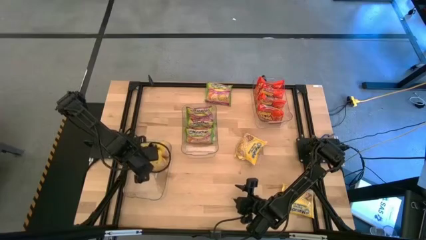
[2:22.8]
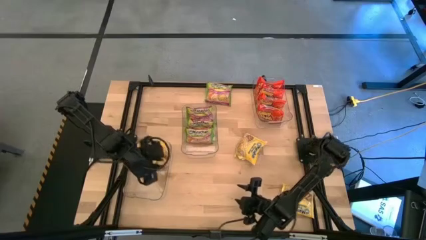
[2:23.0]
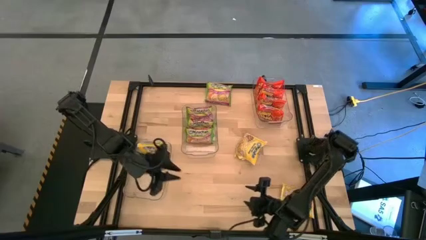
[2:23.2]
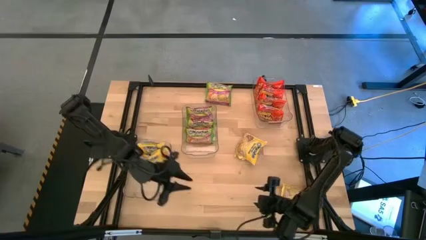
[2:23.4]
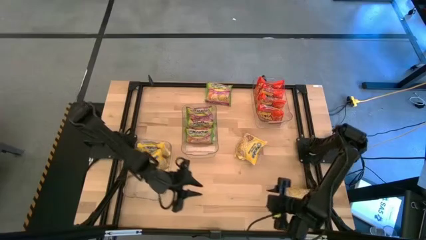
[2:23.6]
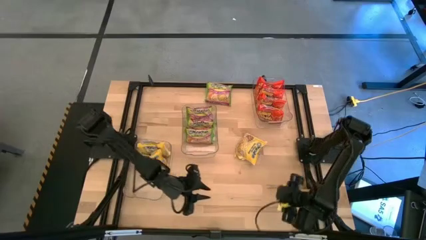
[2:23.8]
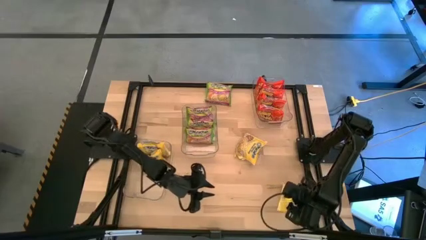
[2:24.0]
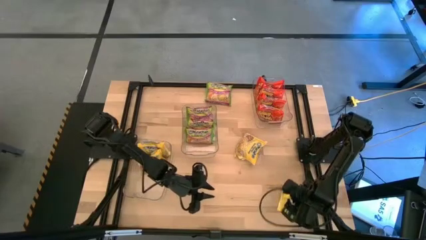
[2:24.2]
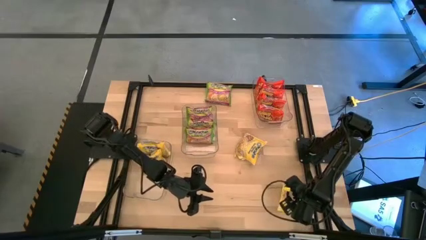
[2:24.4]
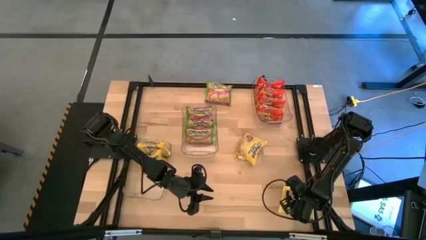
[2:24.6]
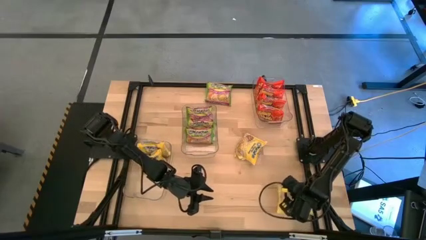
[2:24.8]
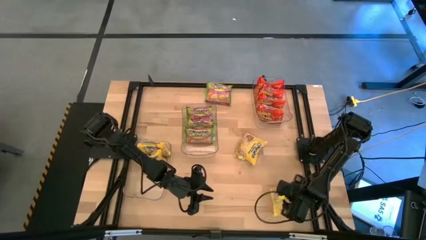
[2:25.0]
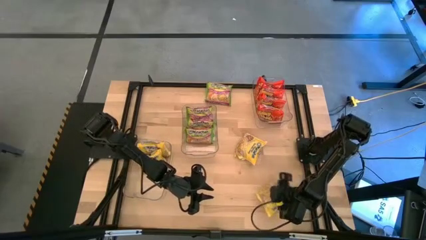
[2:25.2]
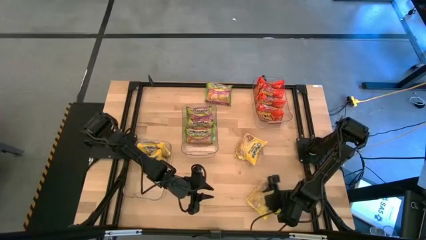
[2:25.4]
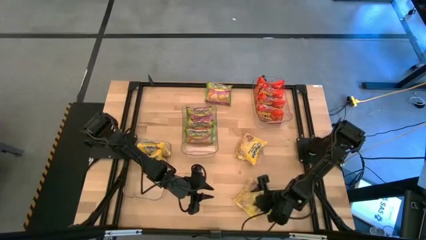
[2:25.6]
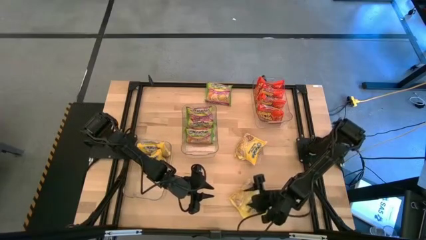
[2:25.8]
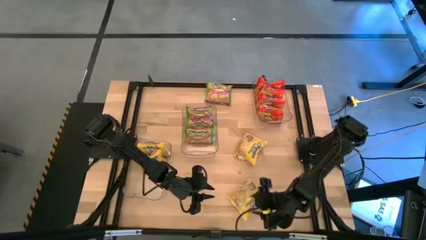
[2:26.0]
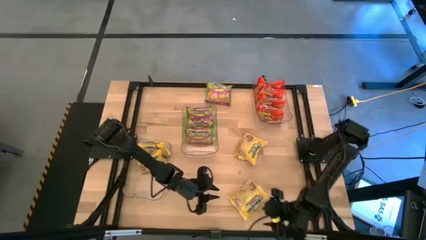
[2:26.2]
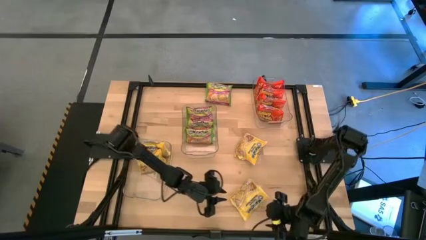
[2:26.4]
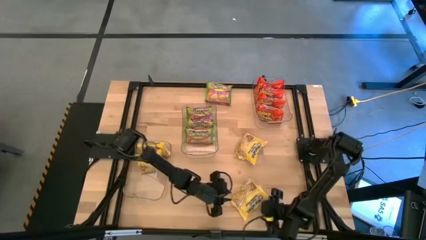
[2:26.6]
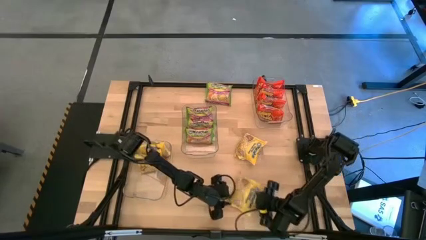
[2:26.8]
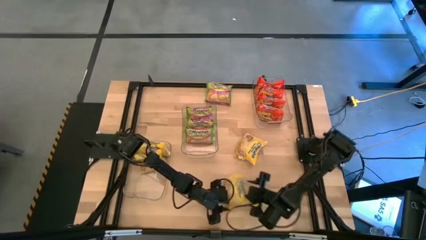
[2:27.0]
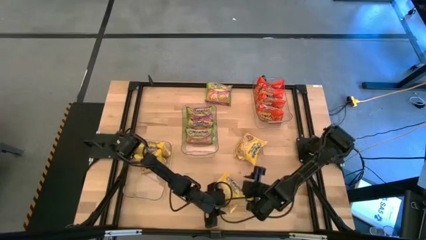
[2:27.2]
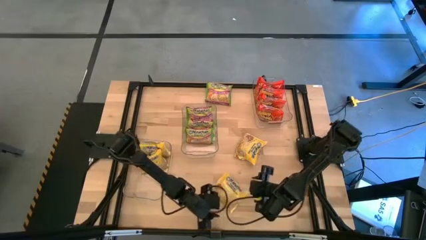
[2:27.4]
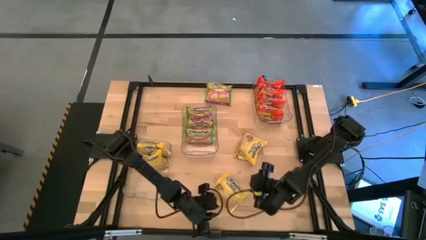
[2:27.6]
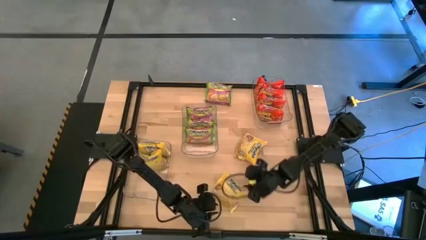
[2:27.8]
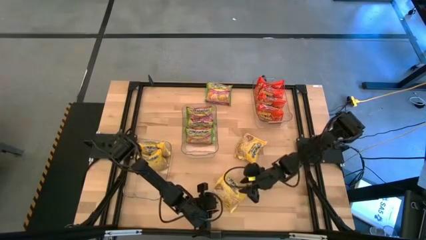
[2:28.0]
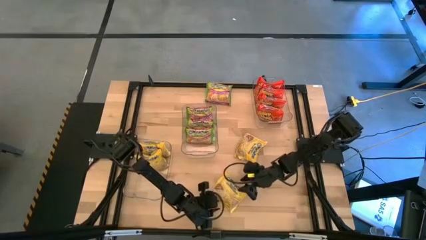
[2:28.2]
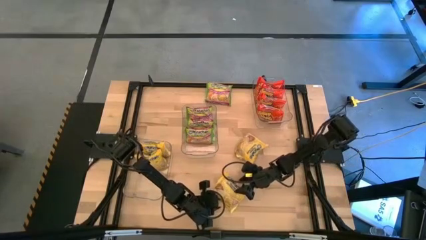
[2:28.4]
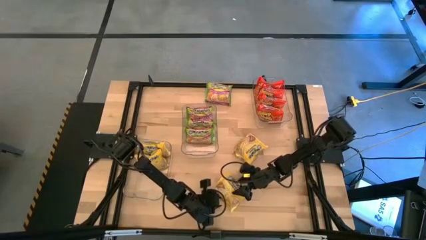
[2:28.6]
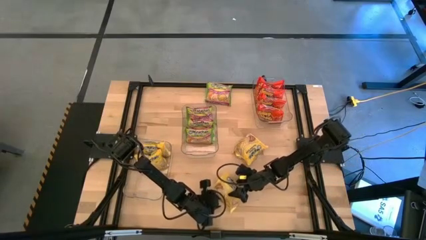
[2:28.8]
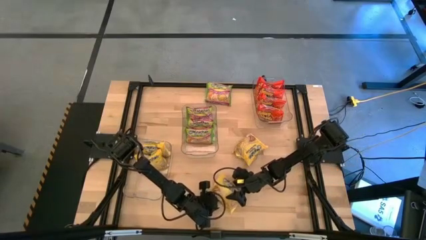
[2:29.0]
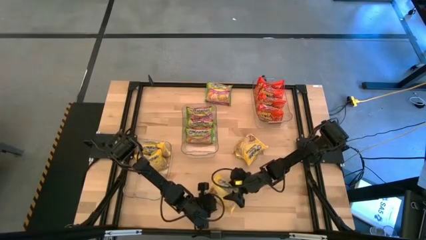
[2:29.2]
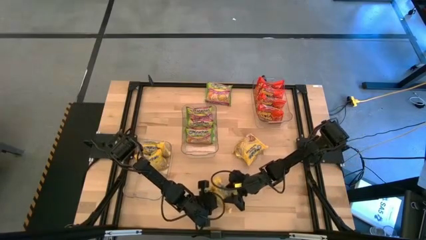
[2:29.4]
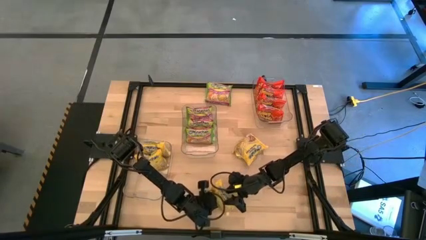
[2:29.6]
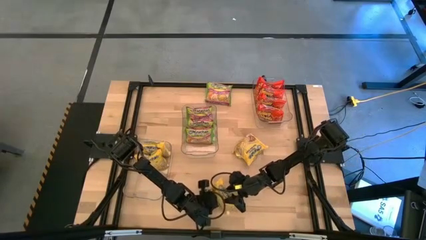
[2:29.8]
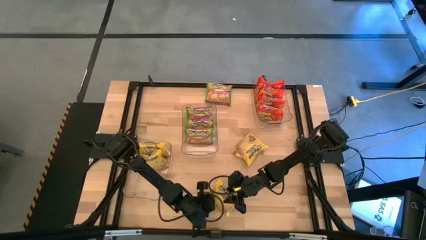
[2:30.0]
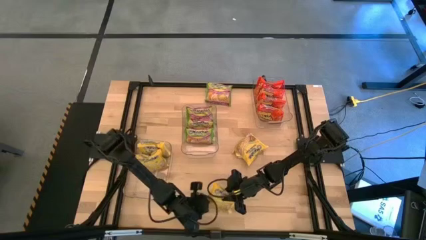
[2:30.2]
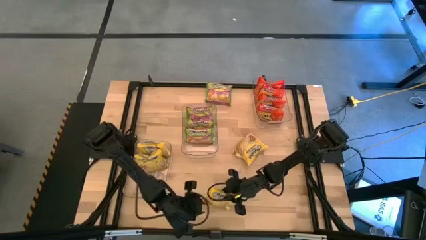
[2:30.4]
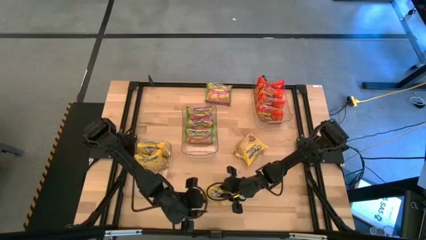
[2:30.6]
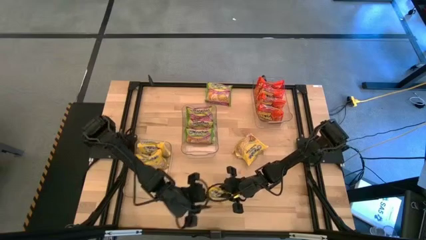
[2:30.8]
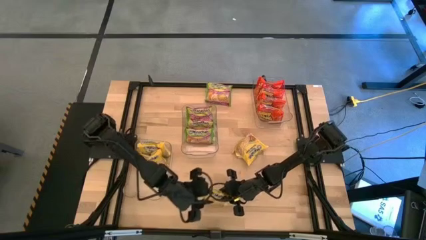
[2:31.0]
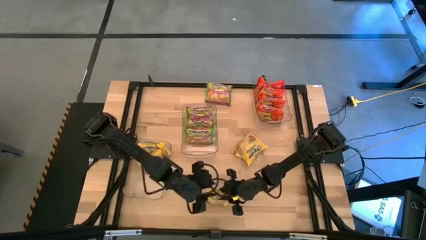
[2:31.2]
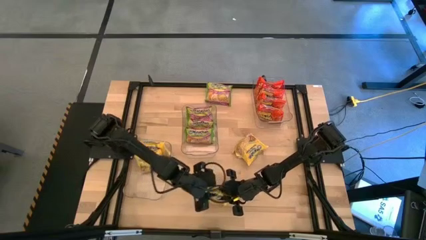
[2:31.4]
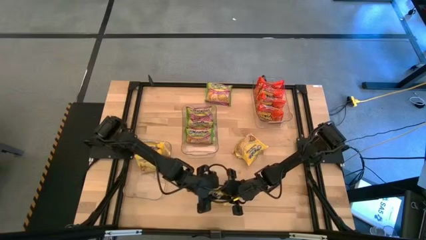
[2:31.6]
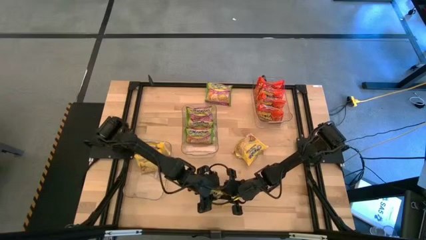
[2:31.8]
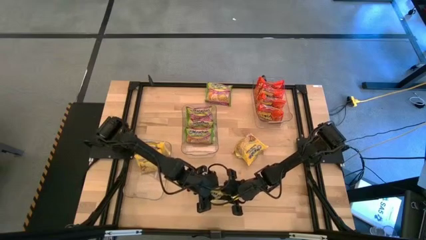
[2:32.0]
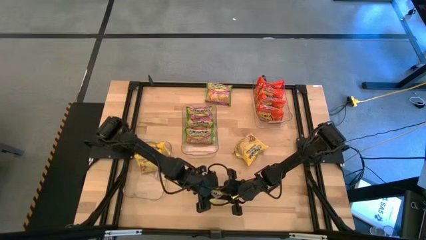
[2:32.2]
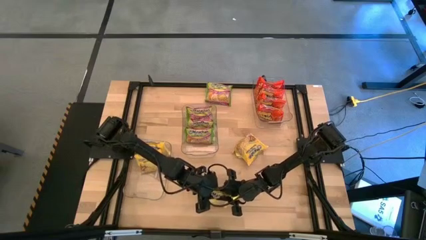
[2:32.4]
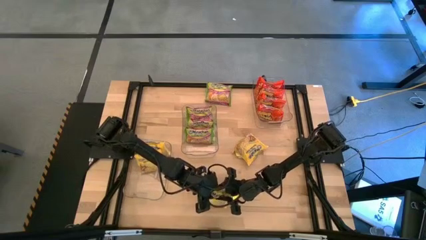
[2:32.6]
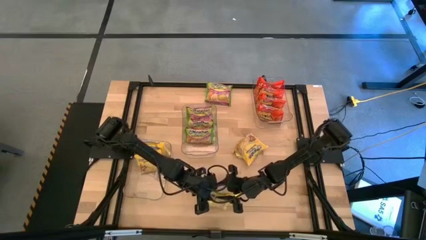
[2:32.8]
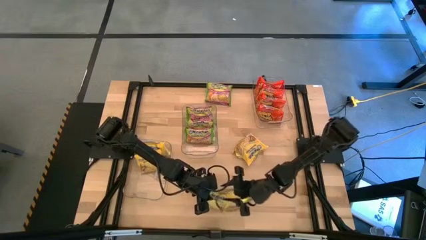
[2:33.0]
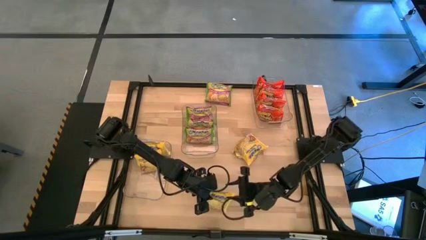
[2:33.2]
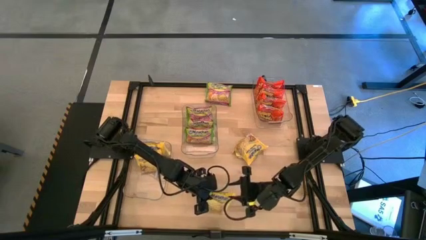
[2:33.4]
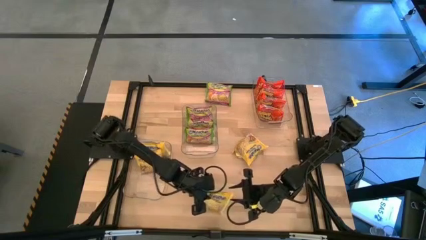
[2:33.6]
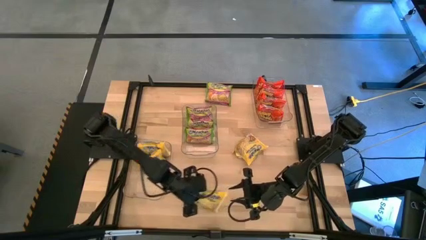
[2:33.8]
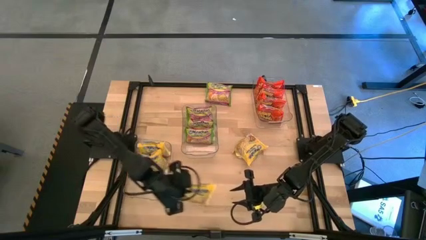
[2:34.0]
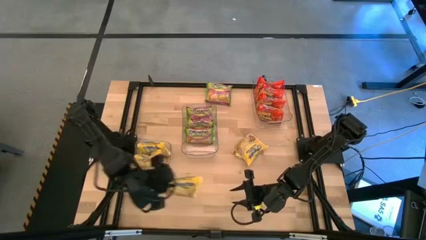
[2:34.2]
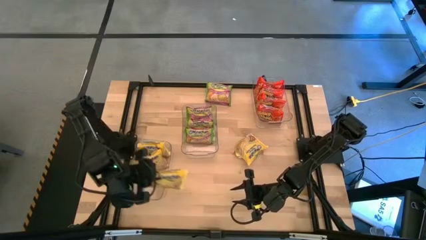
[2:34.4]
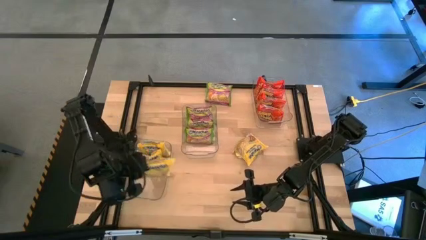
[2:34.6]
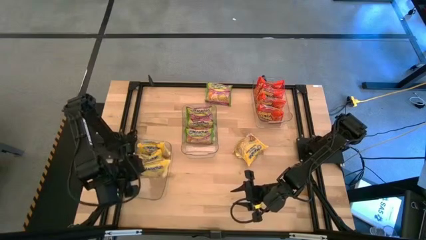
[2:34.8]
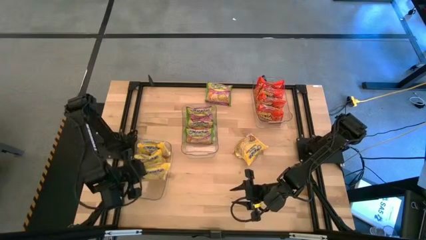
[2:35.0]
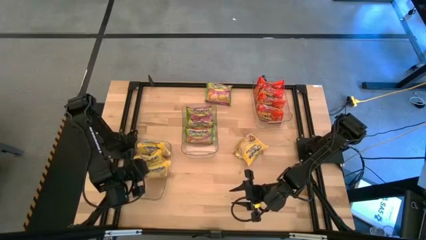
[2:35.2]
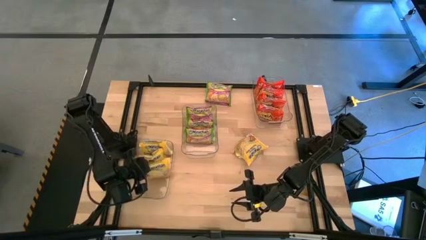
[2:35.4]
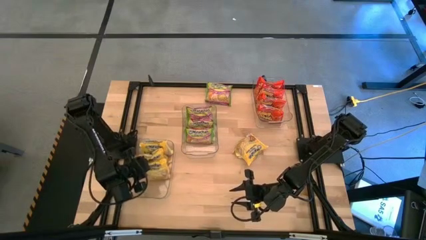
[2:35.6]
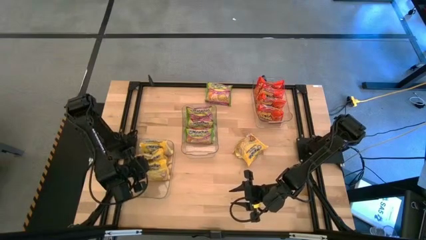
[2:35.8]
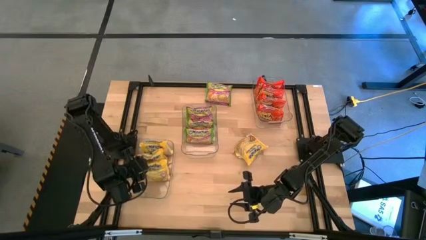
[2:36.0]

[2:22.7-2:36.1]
Task: Sort Maruchan noodles
Put the bottom yellow noodle pack into the bottom left transparent bin
